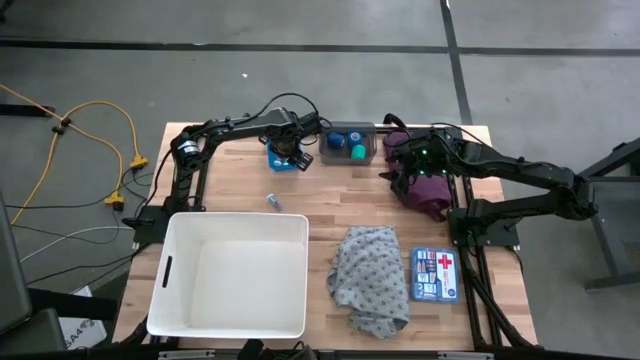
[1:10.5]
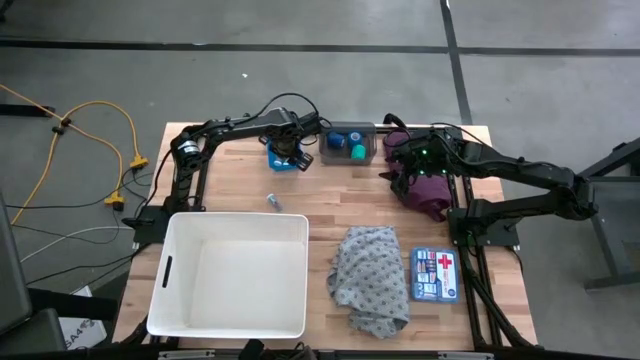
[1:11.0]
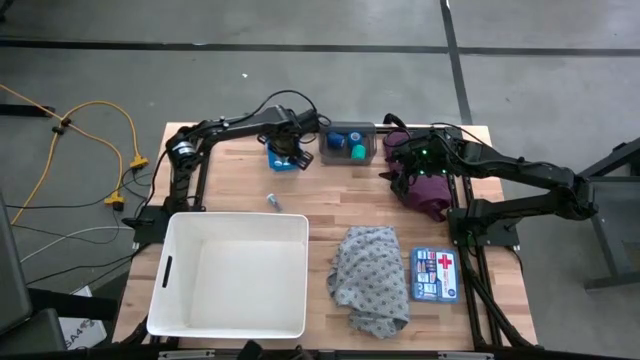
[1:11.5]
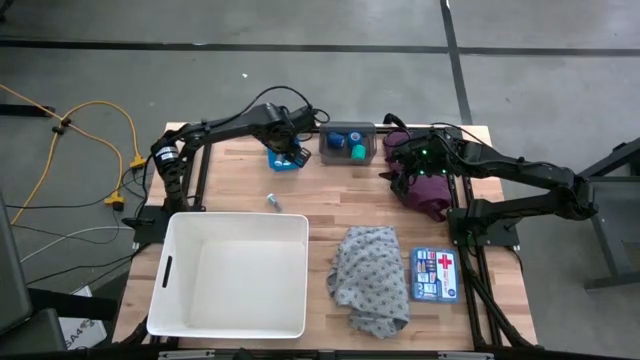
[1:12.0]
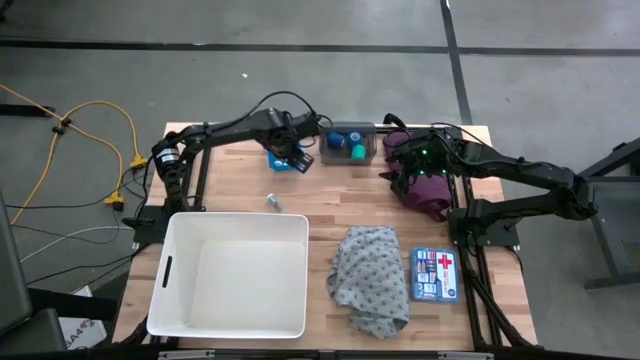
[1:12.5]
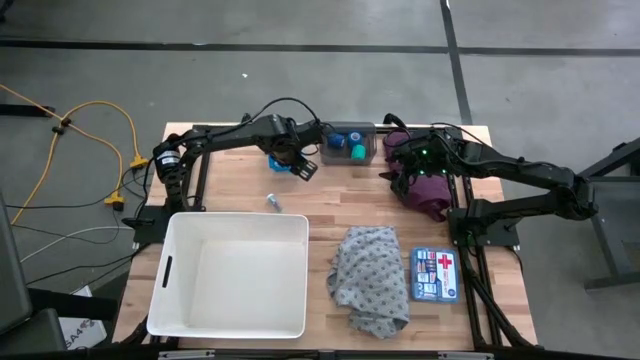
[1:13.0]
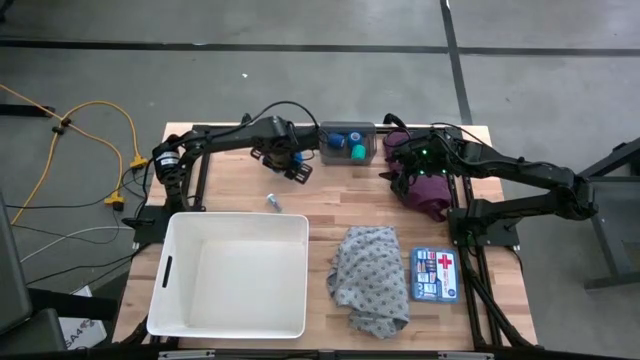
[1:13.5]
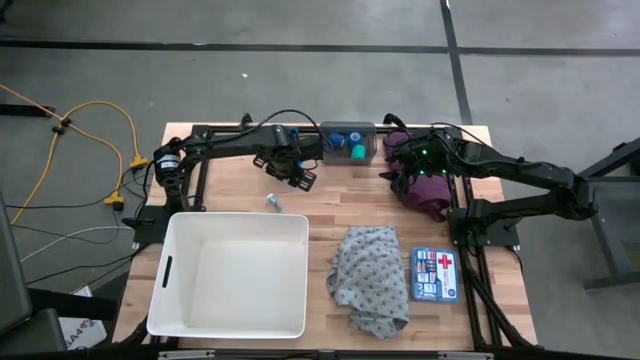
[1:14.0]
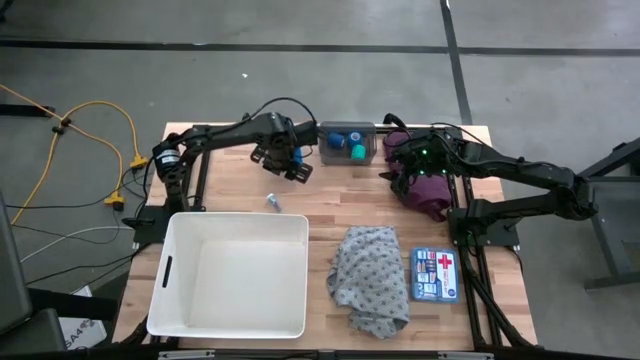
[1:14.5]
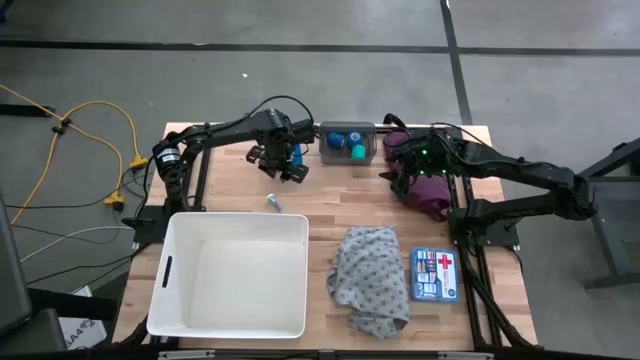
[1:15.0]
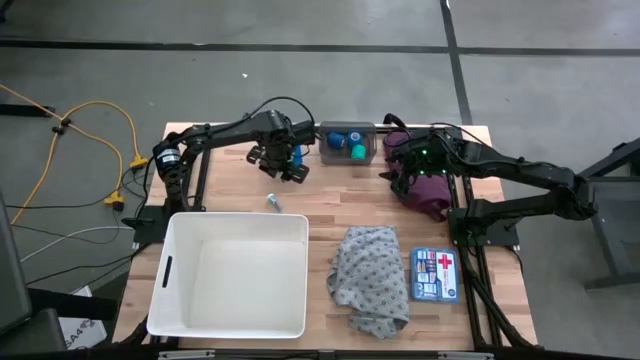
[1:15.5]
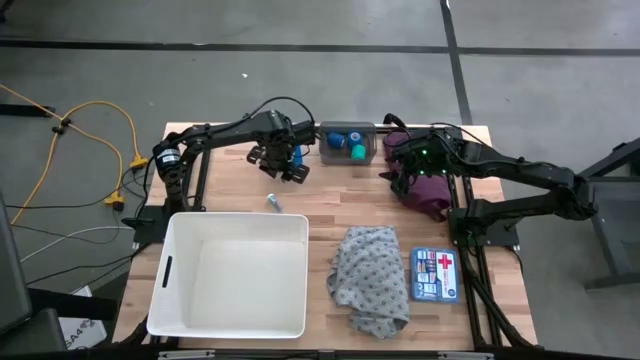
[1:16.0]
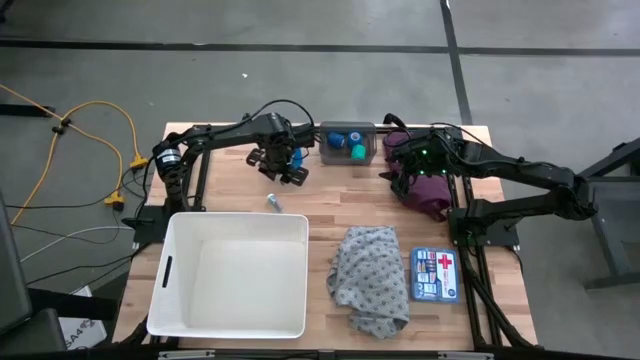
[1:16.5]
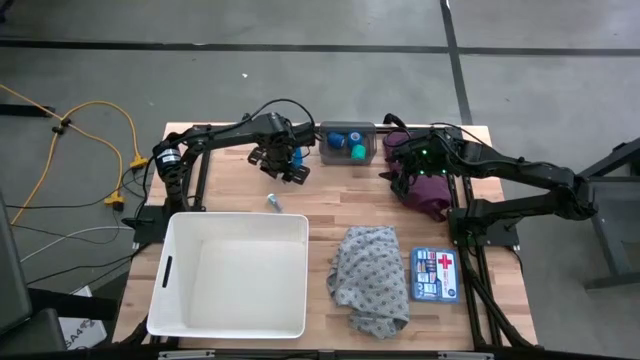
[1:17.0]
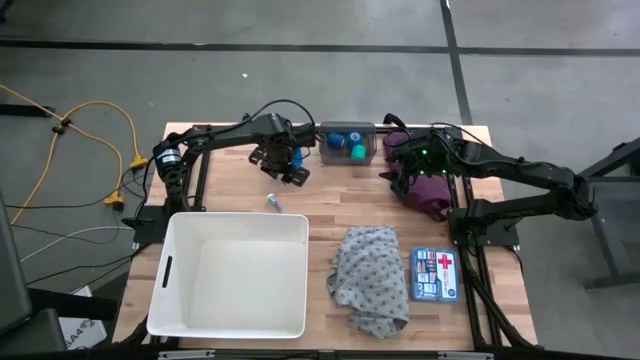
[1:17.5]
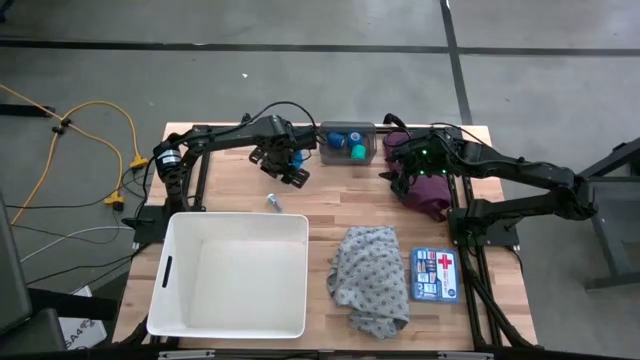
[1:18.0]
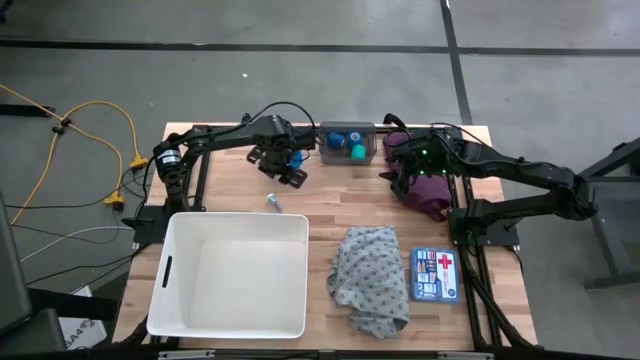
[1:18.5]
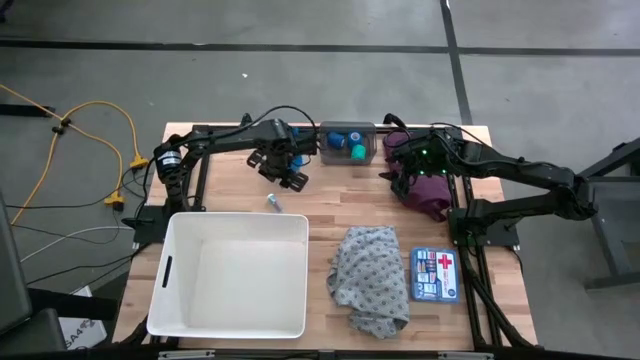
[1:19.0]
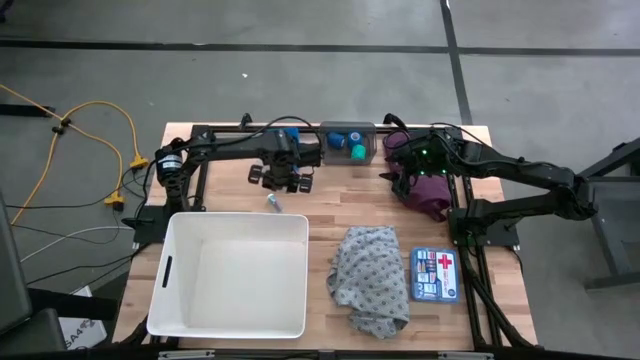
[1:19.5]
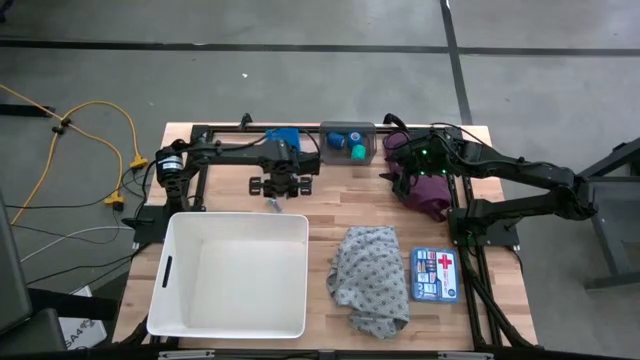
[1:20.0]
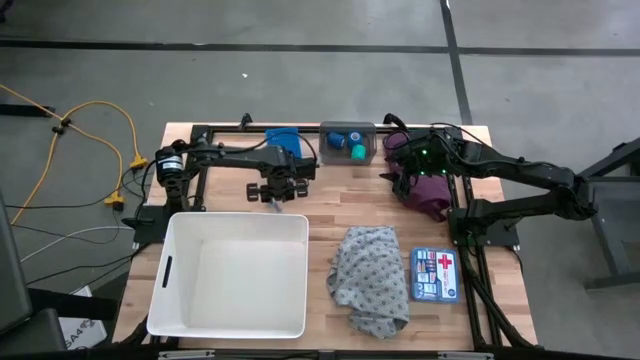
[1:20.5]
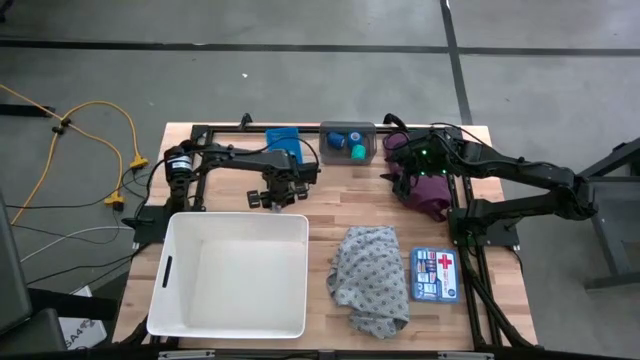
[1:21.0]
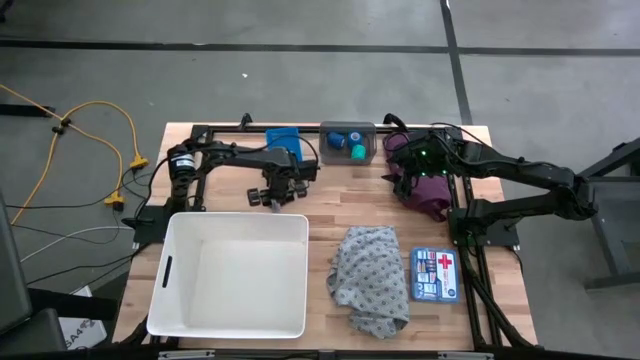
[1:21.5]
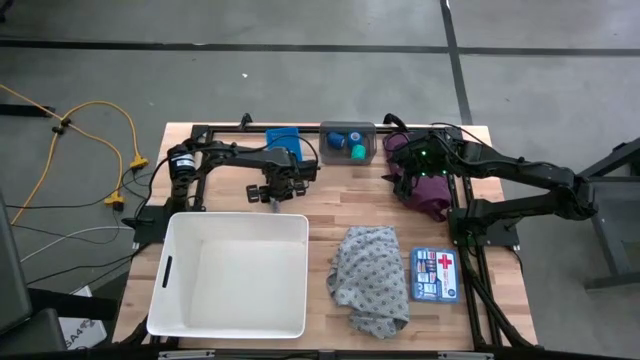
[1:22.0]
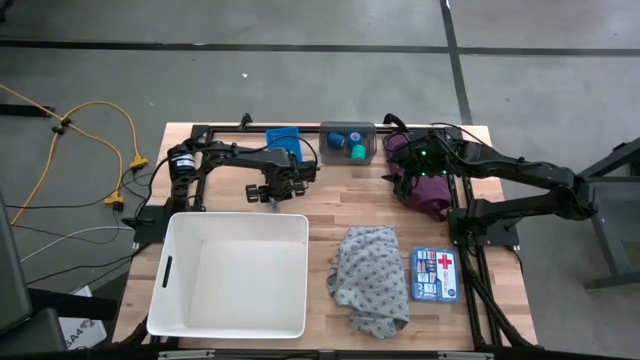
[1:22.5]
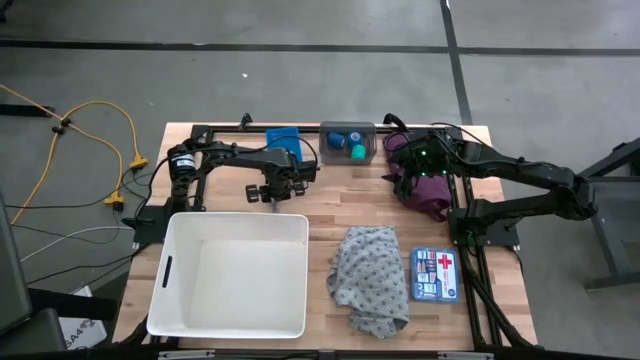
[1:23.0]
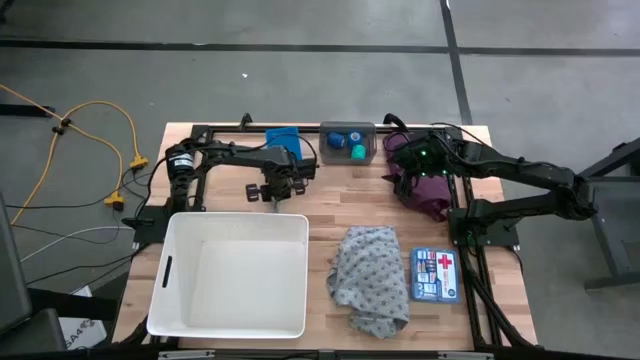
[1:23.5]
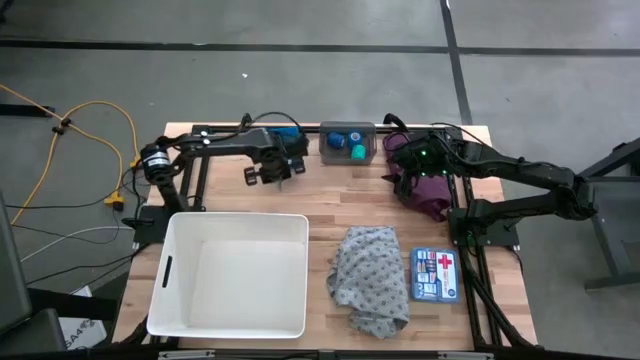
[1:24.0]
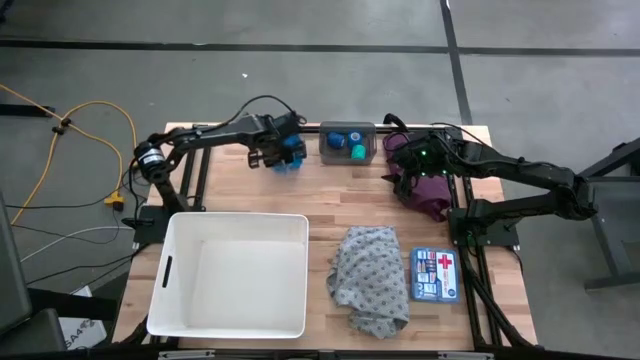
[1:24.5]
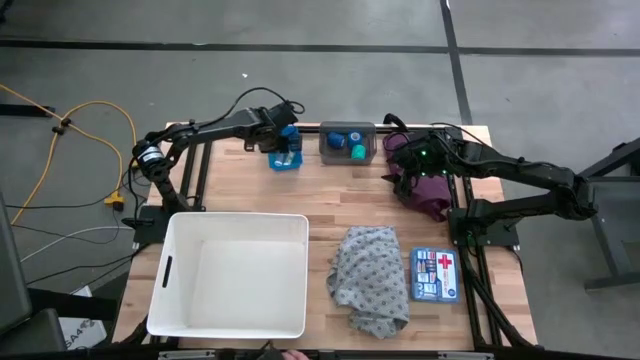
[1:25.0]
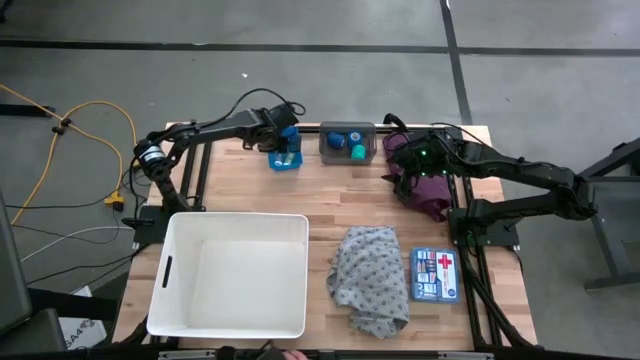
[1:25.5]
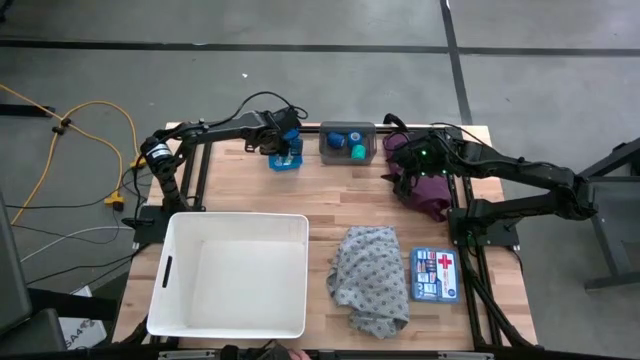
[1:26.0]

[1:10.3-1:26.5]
Task: Pick & place medical supplies in basket/bin
Put the blue pill bottle into the blue bin

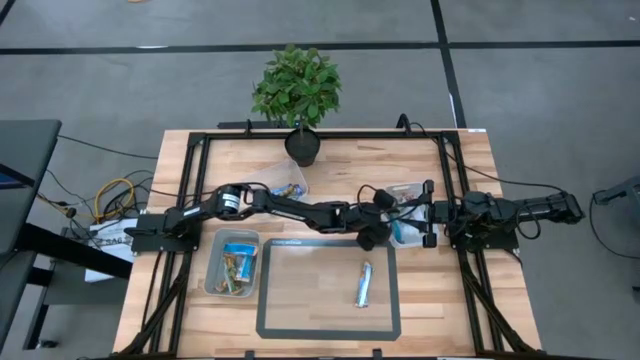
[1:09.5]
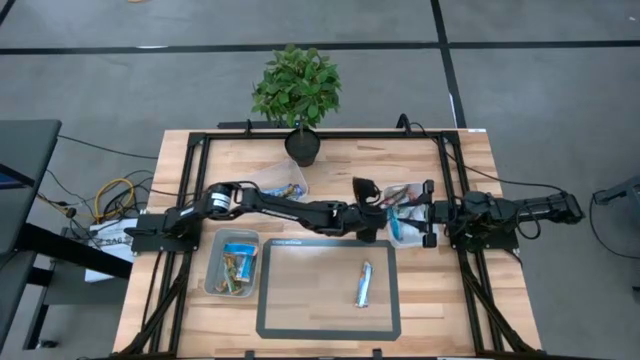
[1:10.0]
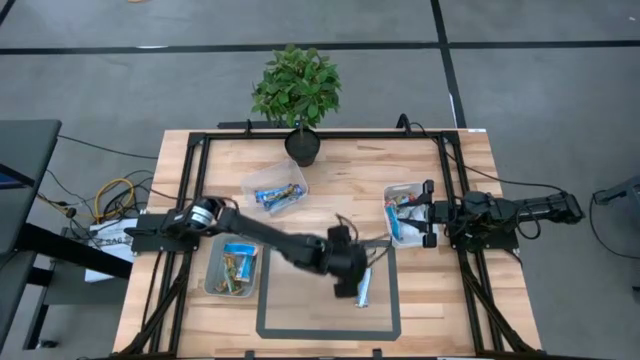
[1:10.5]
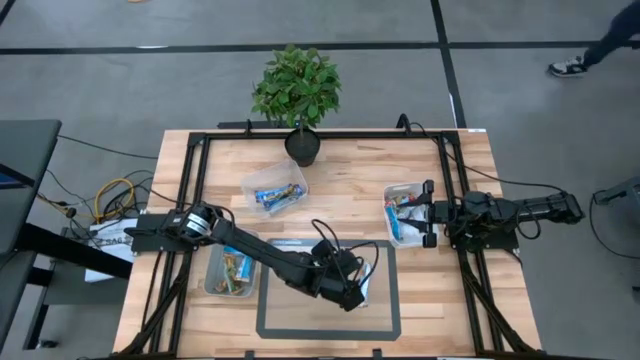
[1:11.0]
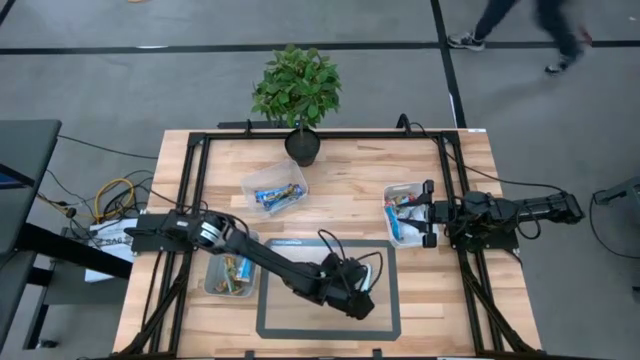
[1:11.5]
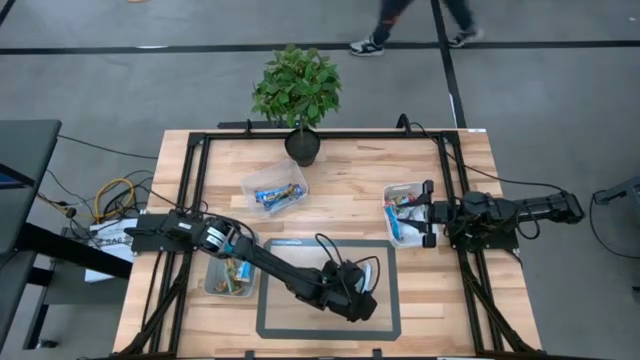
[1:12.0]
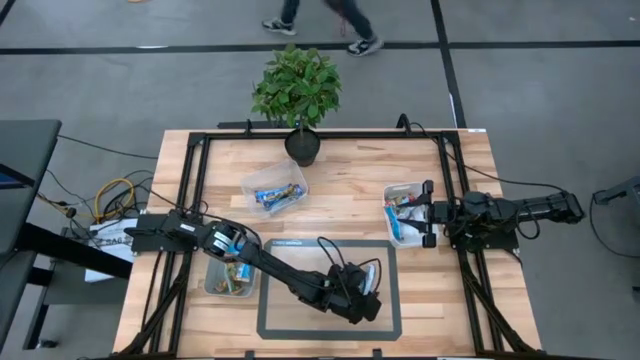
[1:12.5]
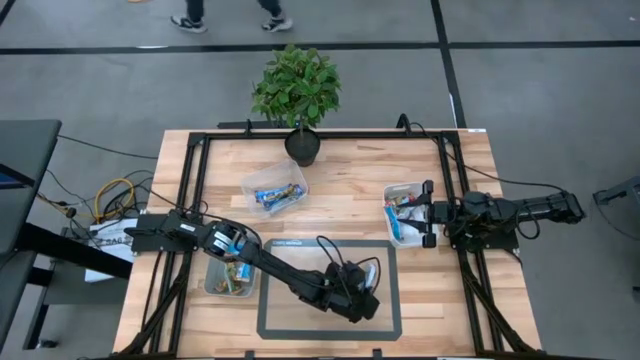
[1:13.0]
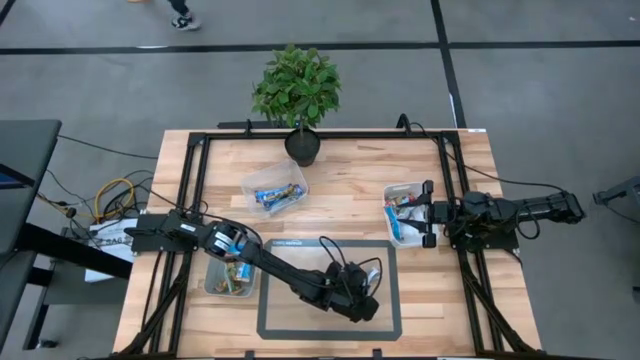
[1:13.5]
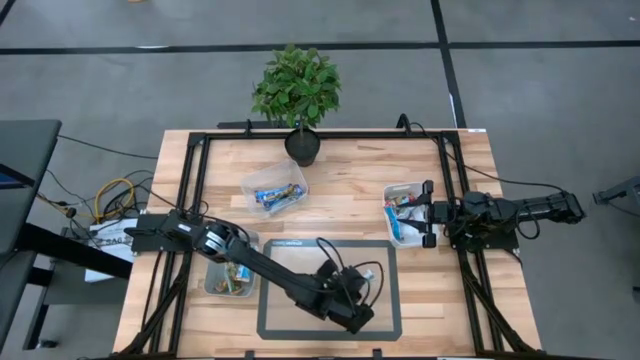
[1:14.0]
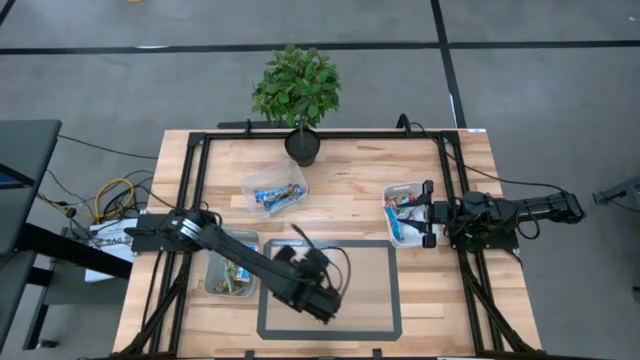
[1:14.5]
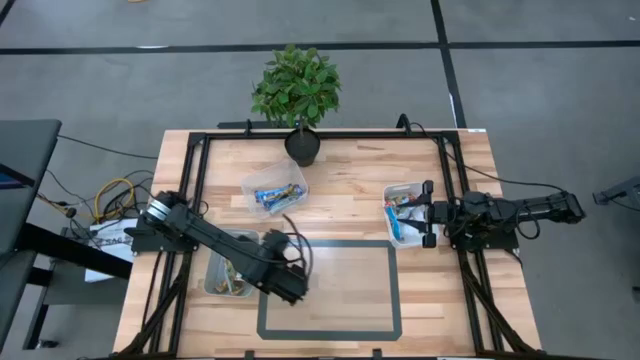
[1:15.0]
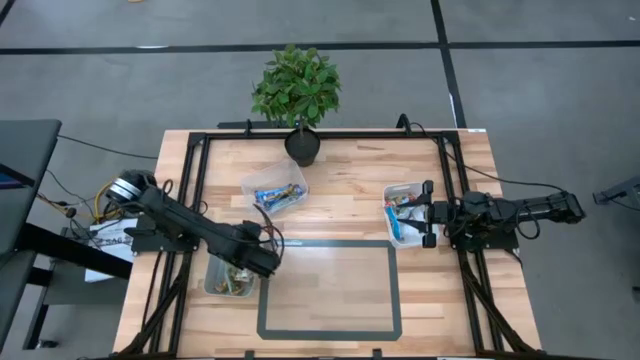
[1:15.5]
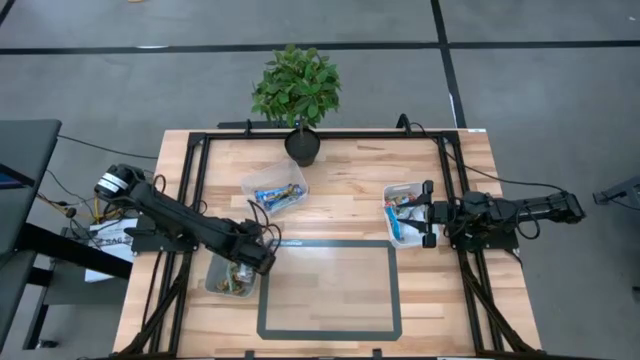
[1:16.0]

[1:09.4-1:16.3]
Task: Pick and place Granola Bars by type
Put the yellow granola bar into the gray bin
